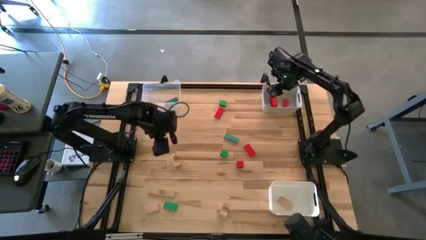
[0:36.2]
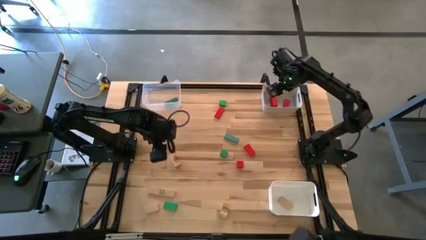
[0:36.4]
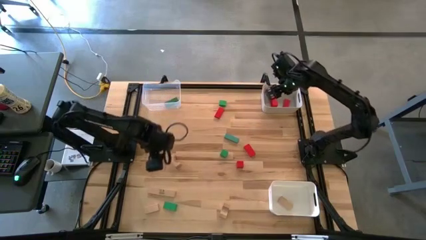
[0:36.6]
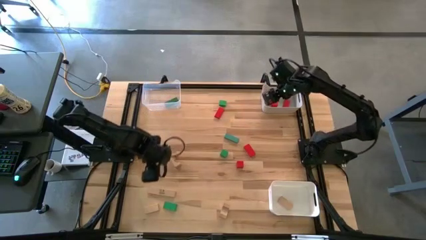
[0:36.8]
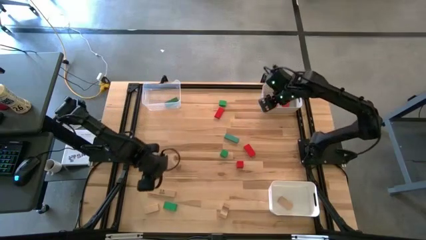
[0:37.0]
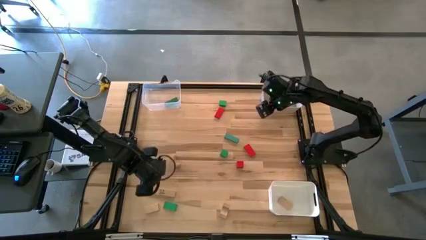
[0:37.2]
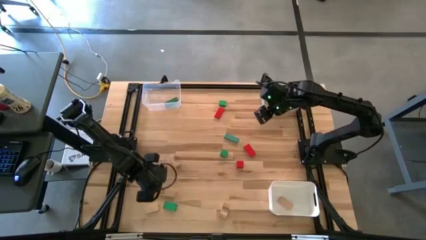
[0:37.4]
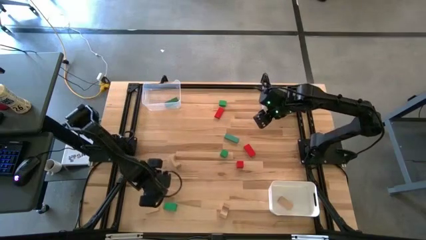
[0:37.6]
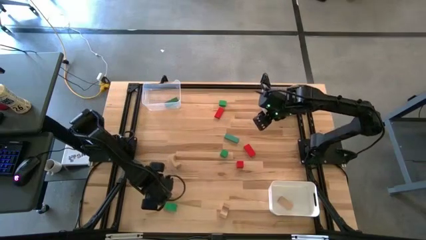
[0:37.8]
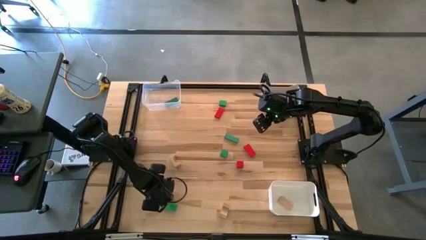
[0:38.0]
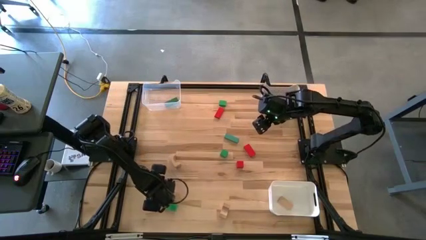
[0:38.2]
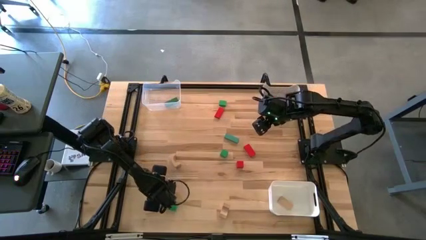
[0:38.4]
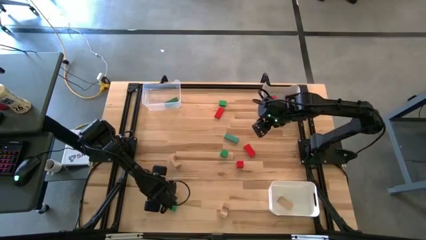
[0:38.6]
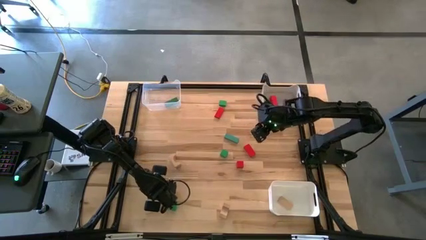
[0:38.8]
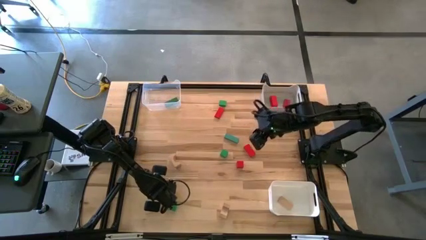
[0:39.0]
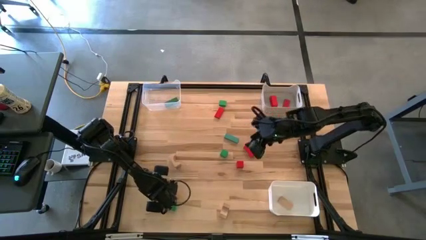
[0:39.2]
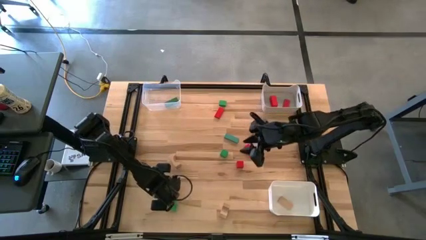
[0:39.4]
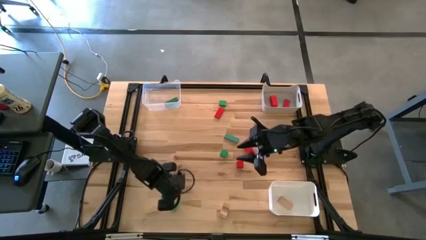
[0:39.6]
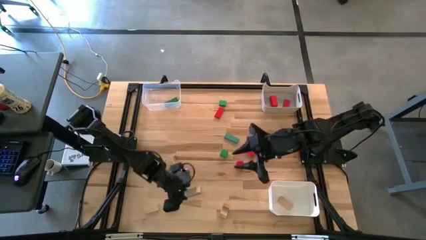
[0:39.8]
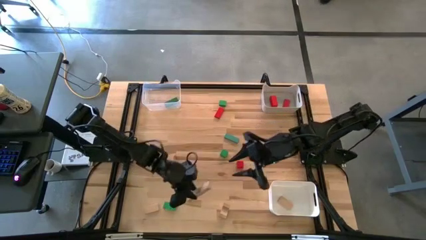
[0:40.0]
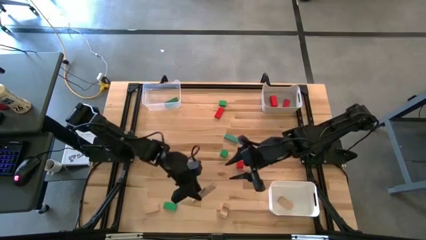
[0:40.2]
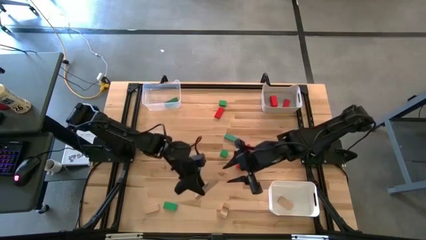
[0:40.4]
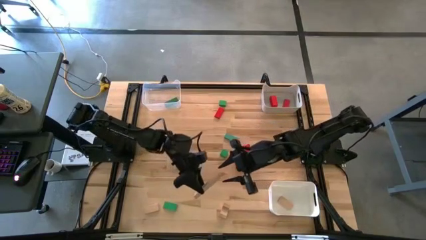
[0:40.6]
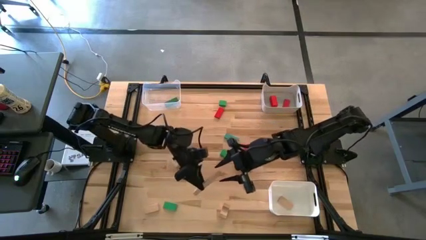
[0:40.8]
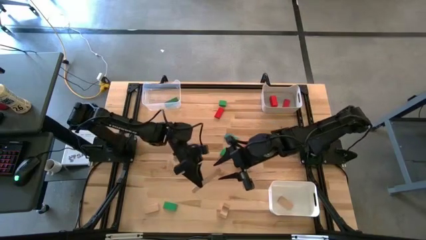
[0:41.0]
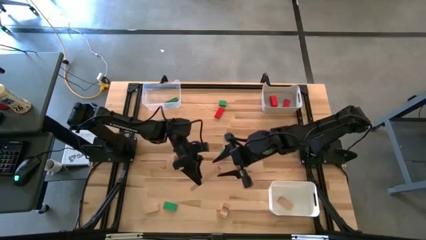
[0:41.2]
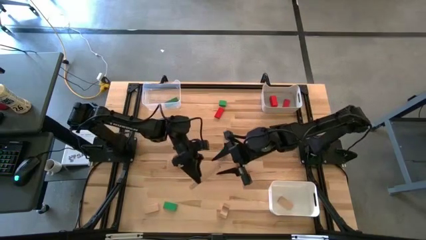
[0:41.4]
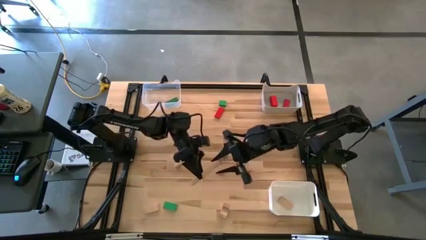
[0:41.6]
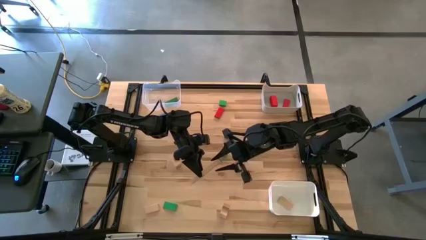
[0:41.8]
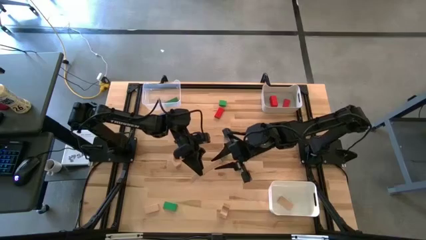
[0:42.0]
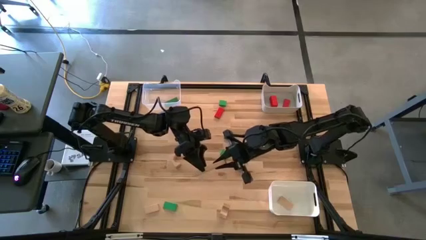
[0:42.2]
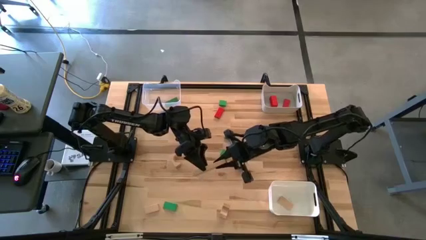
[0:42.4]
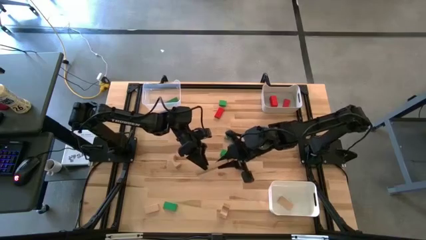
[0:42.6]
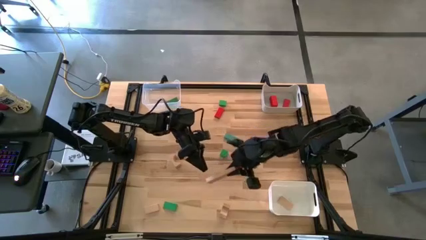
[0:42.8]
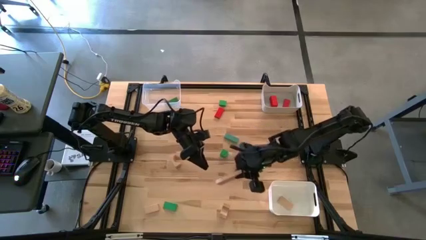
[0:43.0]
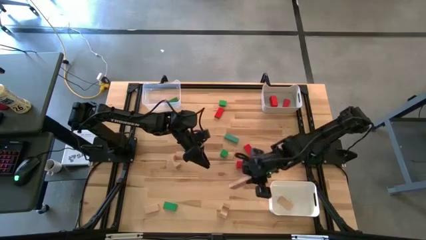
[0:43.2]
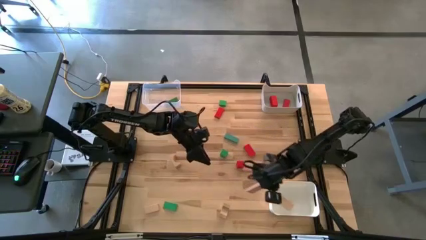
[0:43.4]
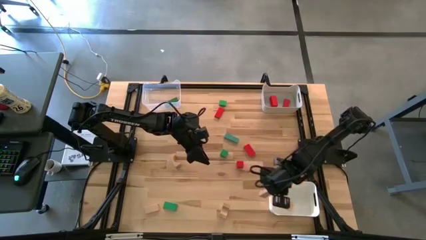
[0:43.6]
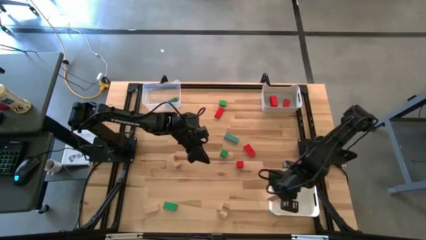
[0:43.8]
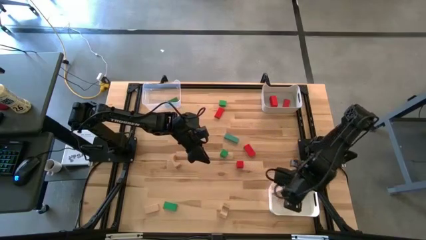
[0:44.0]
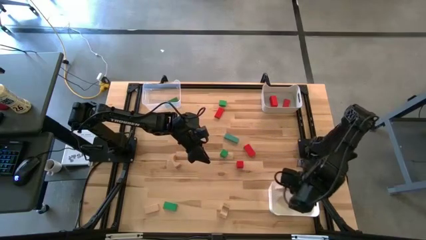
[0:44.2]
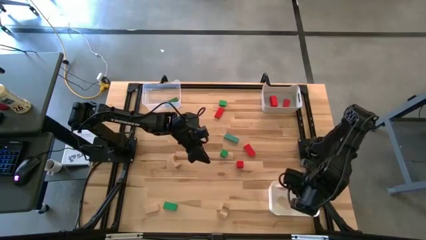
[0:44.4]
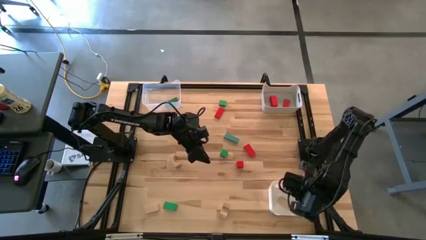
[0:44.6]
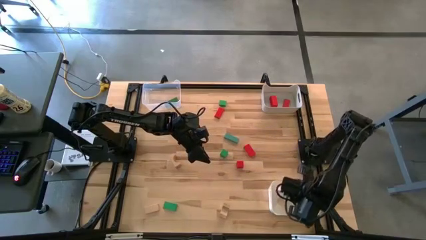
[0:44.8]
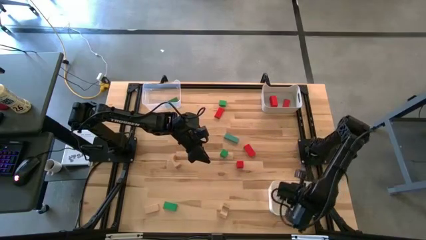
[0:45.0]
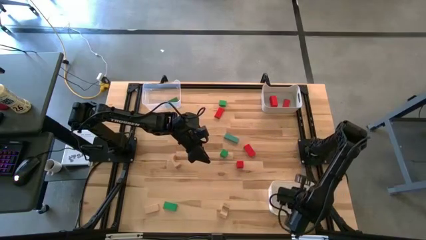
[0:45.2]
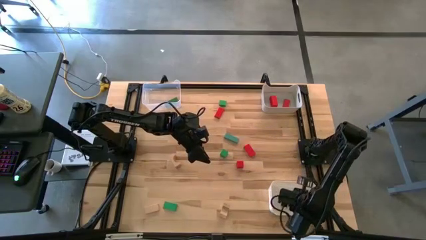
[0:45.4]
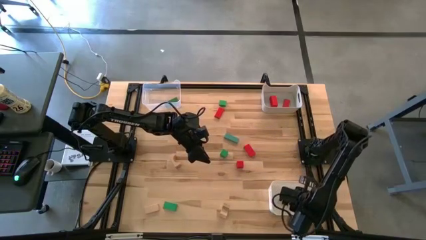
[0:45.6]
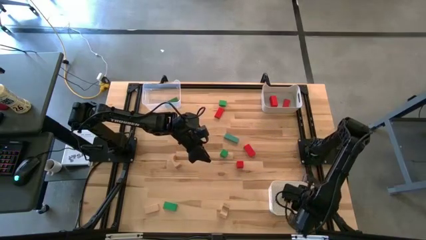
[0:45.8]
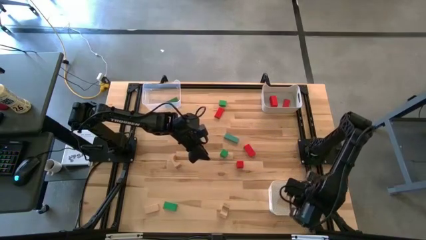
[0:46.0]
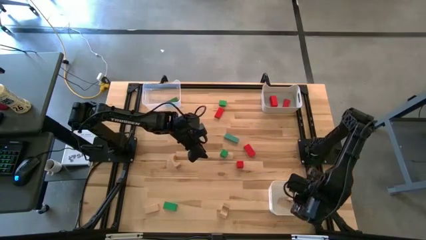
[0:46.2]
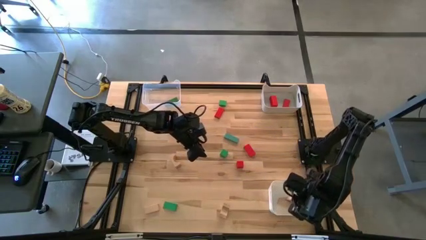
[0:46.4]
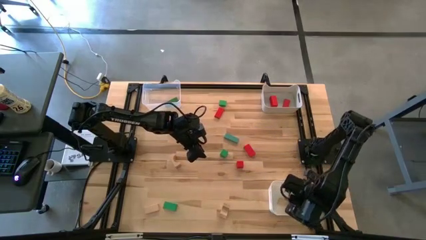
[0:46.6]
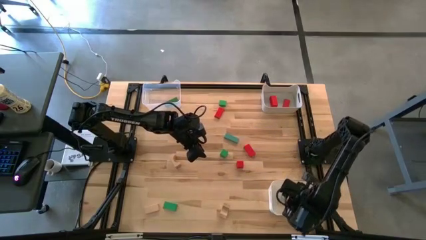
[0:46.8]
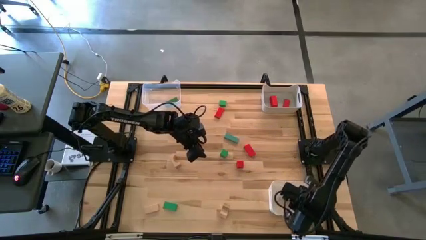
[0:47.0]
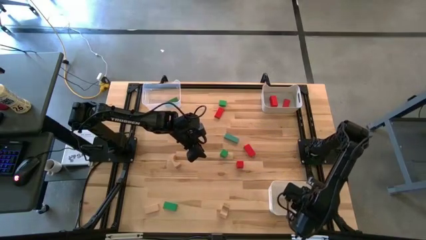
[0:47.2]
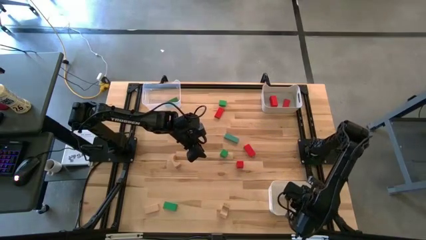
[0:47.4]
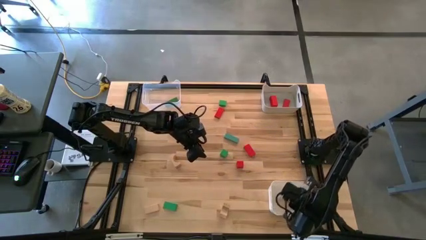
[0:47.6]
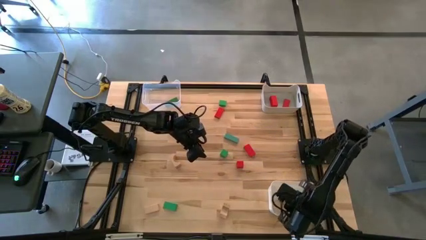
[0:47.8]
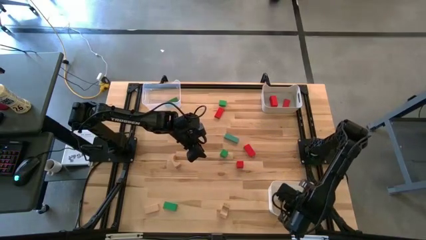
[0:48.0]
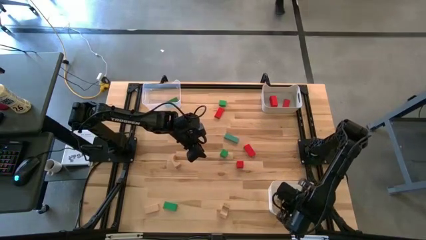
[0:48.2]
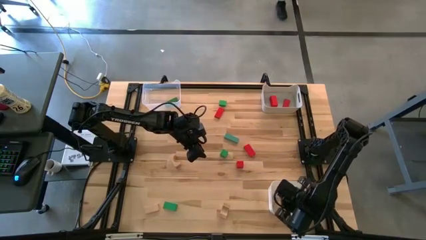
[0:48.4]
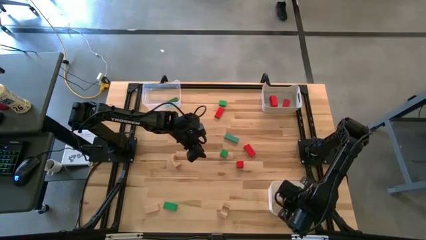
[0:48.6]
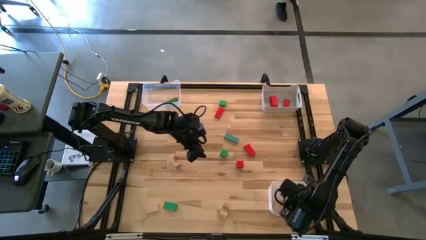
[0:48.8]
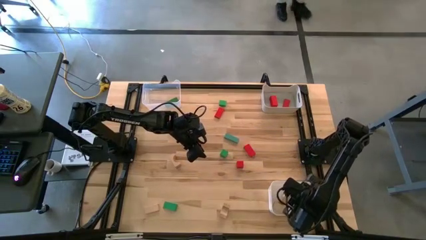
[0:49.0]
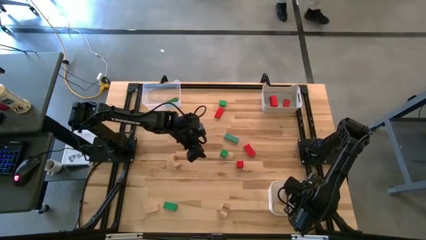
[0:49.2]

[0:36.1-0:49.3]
Task: Sort & place blocks by color
Put the brown block into the white bin
